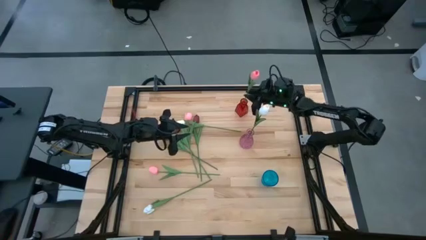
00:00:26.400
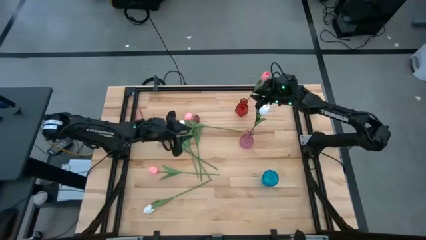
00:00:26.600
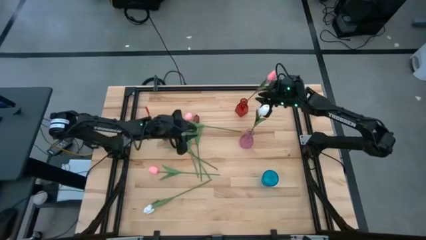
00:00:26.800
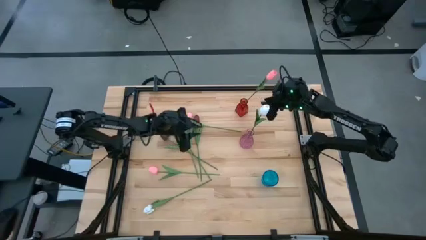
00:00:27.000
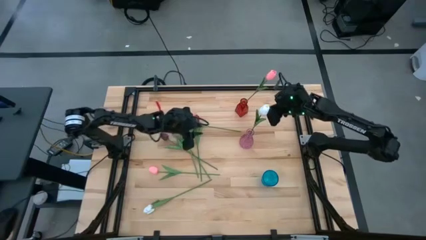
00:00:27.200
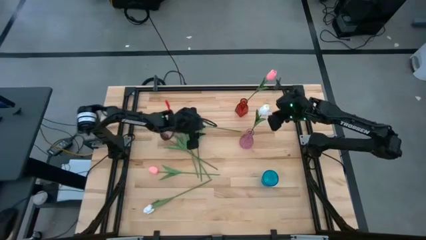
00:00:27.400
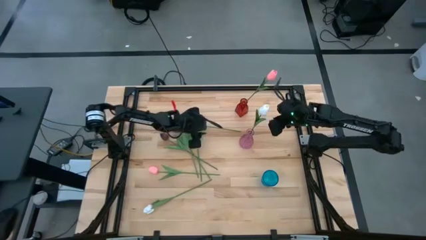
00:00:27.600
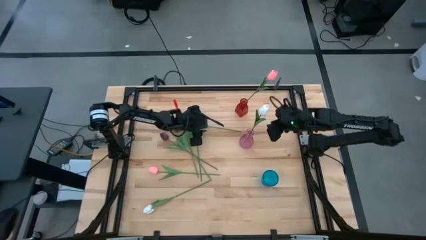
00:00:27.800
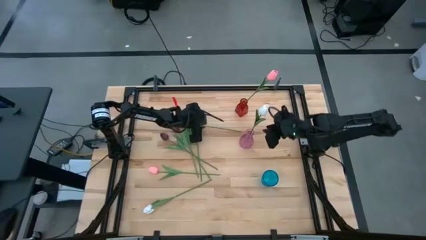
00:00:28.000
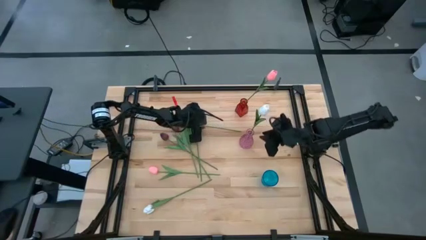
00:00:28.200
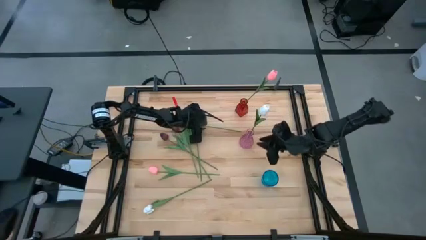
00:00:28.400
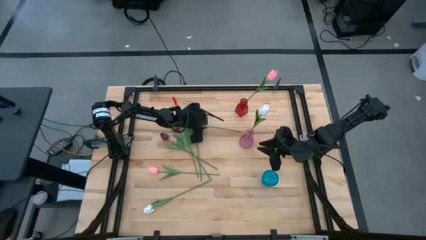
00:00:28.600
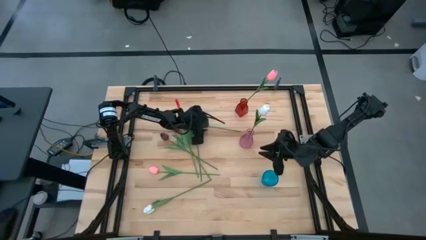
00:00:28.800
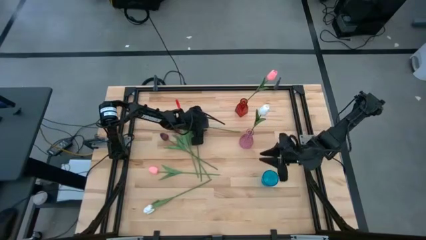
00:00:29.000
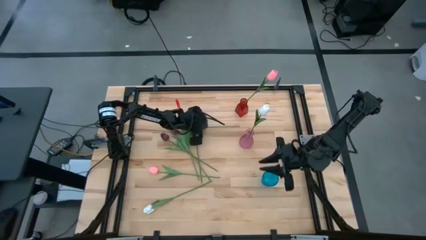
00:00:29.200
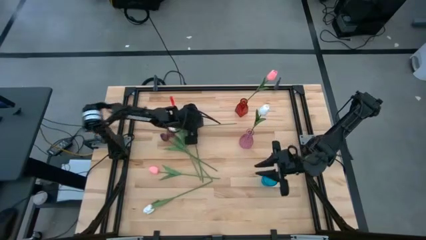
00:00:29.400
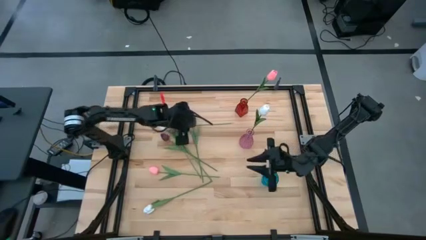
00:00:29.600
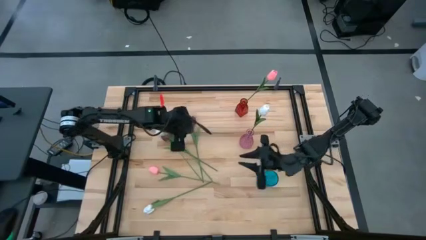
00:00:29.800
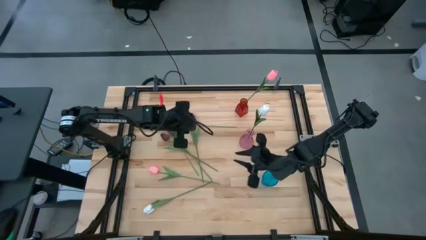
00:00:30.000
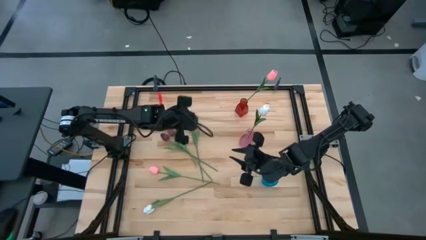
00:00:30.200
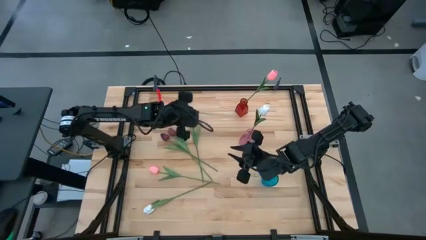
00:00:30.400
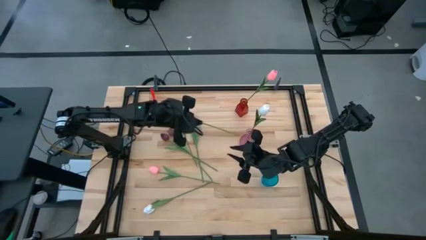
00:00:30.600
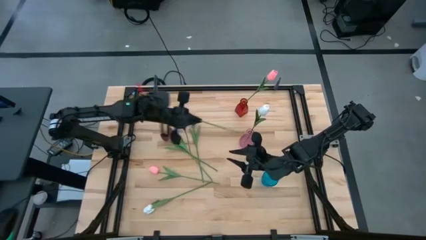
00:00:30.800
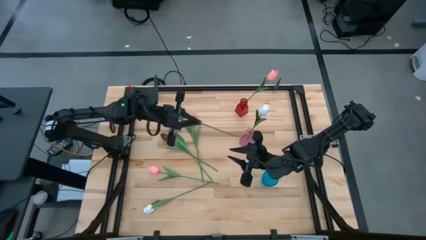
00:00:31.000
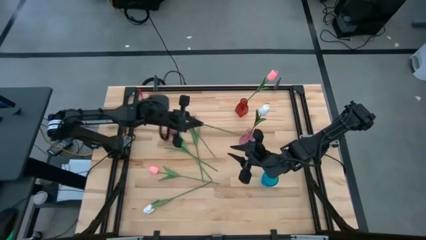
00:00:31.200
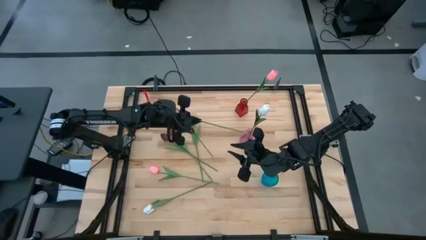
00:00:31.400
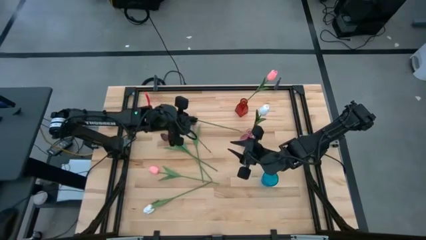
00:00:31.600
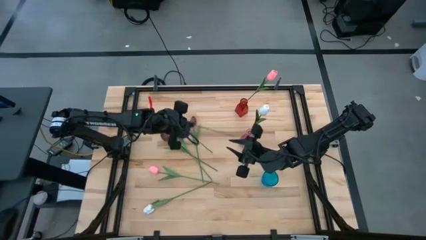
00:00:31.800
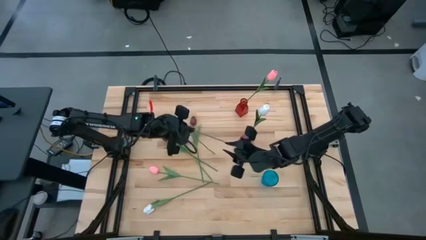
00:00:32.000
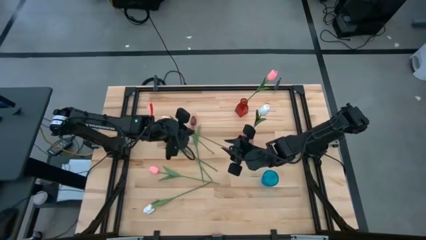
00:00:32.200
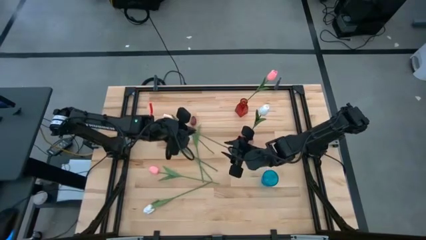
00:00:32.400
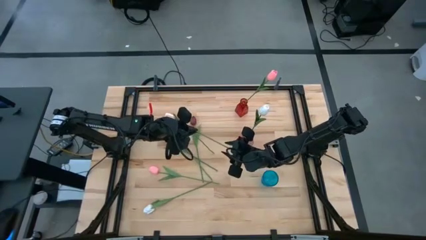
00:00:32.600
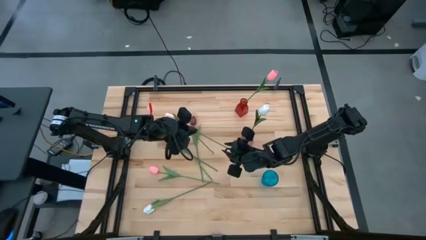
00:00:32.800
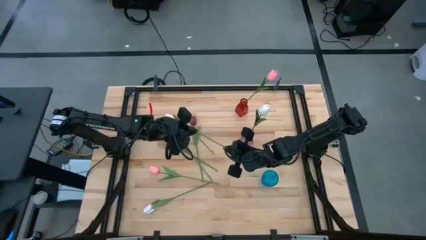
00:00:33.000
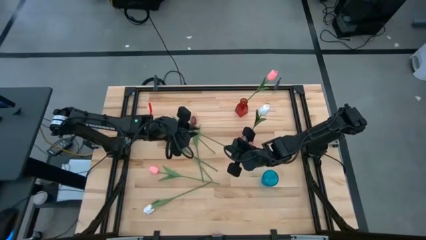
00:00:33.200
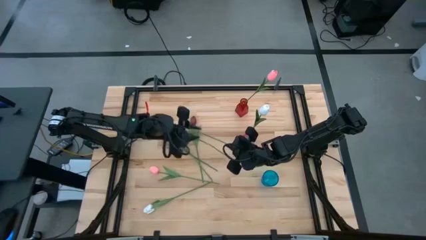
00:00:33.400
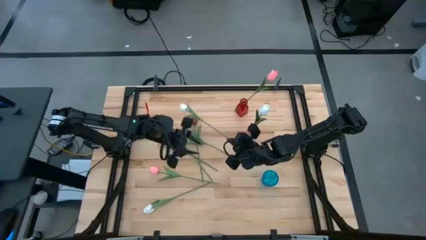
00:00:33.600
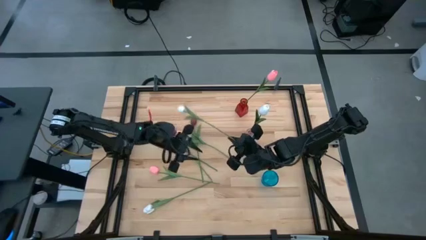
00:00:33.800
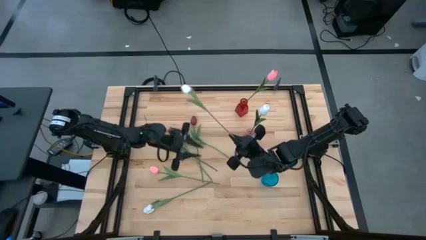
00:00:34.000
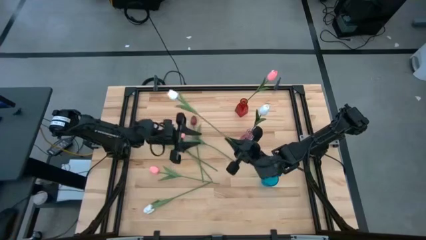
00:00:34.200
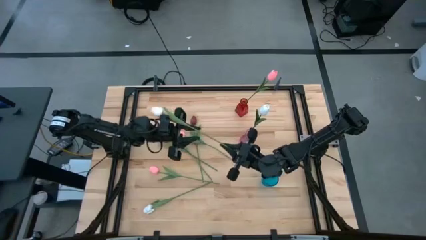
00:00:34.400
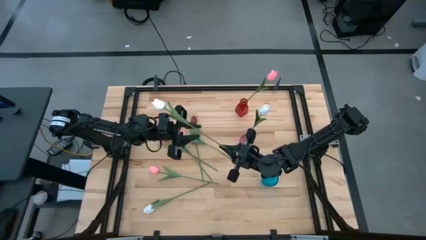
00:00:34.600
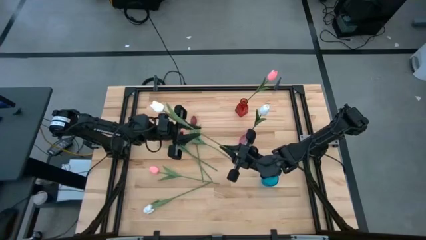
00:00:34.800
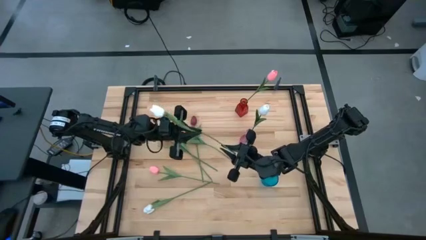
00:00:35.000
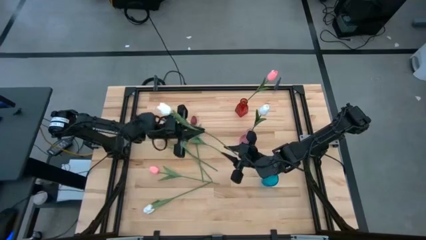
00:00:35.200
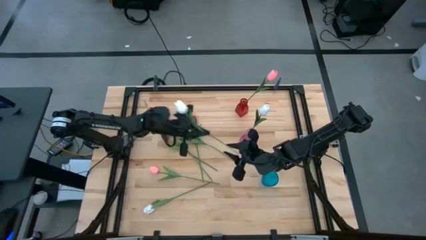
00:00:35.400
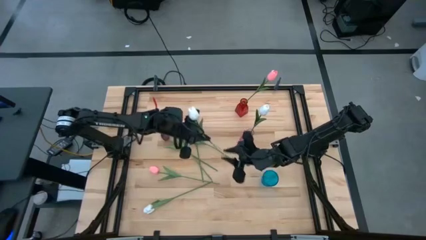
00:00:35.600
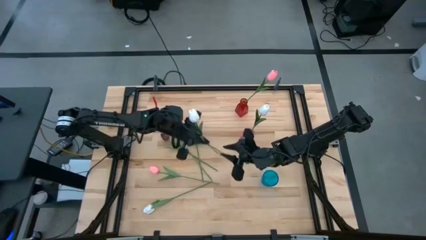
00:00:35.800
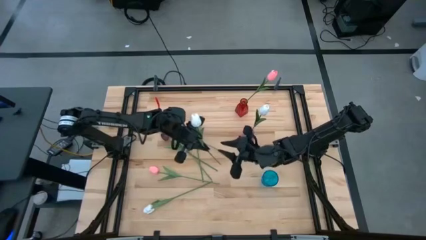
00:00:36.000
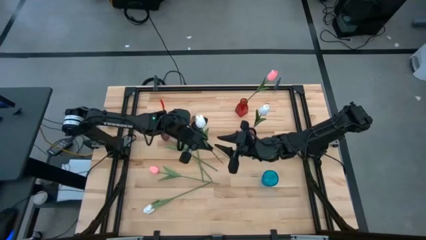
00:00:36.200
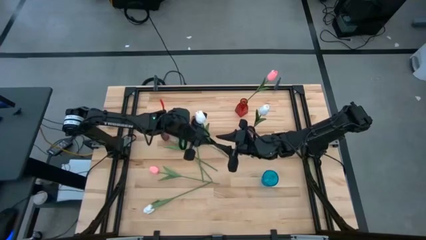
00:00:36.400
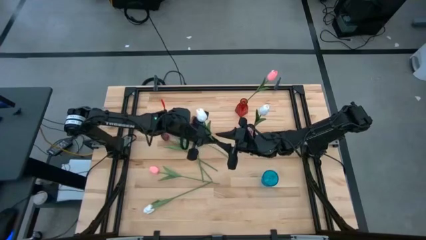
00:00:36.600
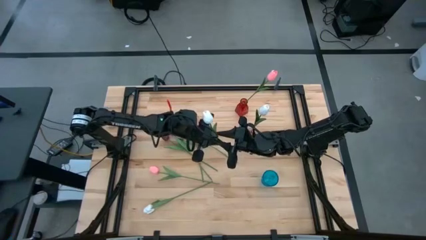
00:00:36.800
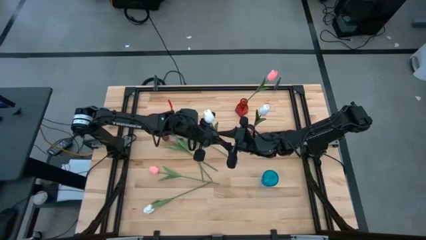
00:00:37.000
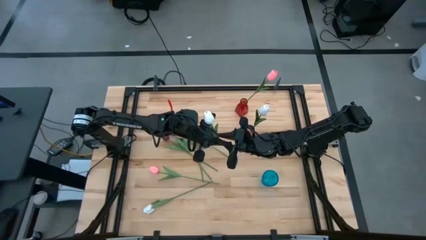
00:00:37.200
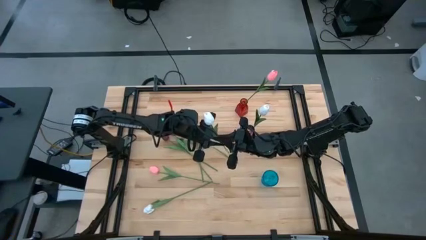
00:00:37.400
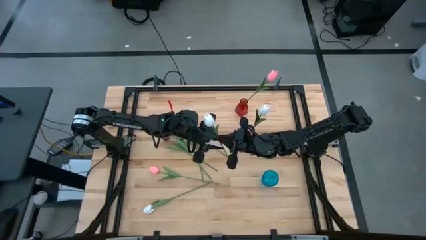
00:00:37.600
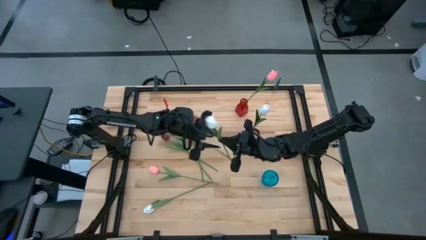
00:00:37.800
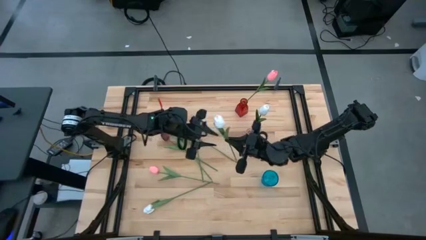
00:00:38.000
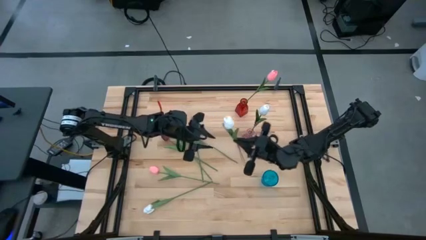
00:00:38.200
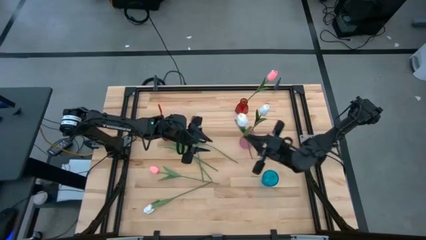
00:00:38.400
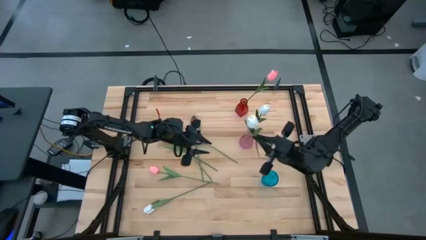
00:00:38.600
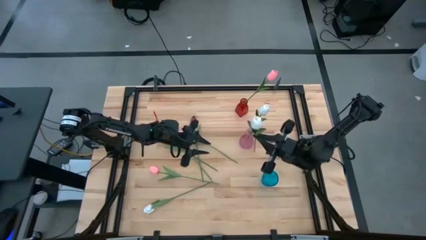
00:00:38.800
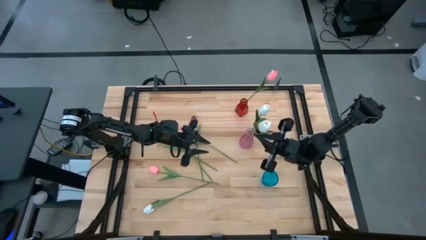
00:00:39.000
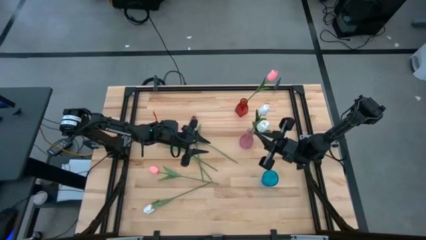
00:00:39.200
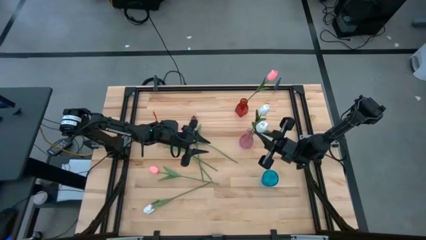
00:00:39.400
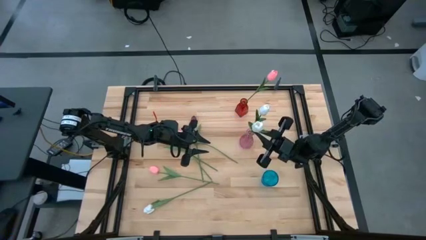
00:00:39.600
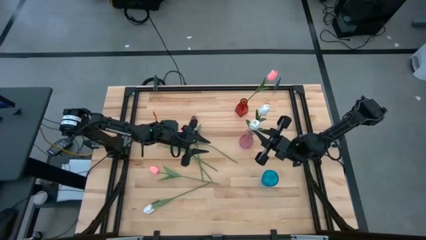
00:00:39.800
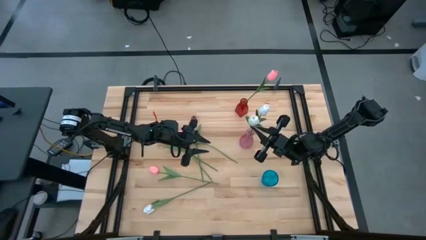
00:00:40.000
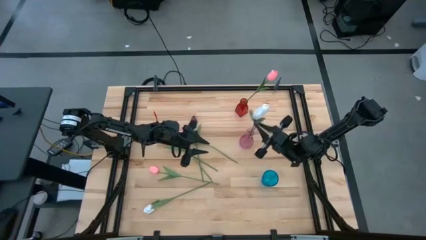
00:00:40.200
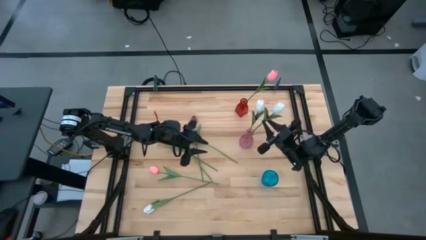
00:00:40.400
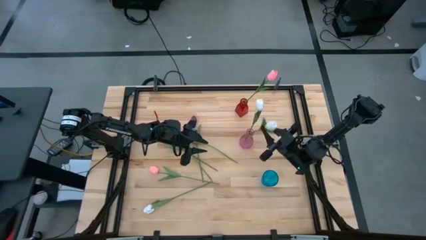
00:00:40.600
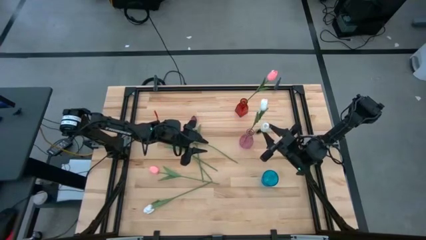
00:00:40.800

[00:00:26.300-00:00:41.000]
Task: Sort flowers into vase by color
Put the top white tulip into the pink vase

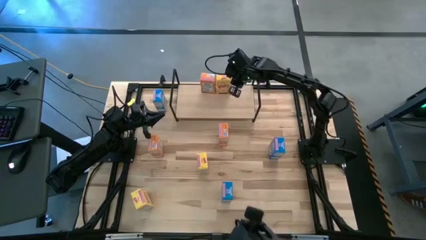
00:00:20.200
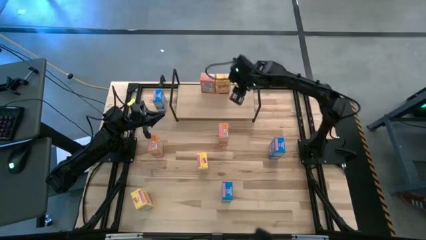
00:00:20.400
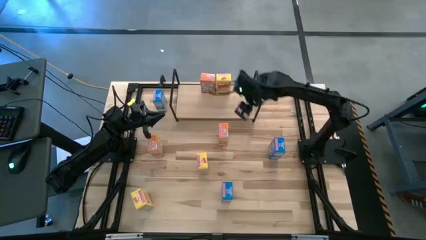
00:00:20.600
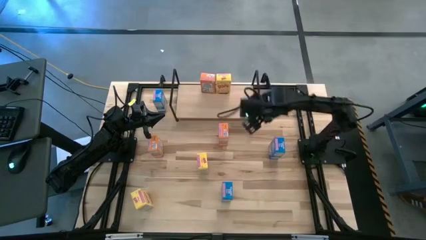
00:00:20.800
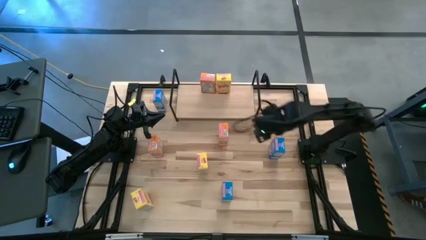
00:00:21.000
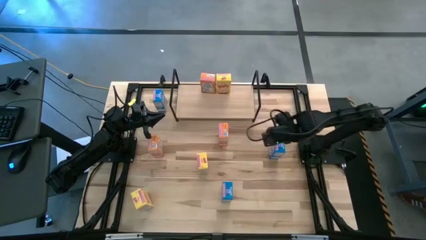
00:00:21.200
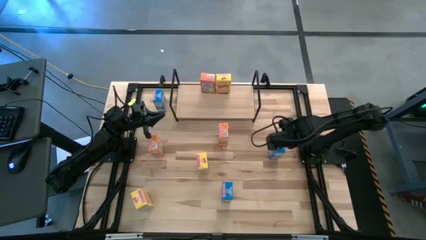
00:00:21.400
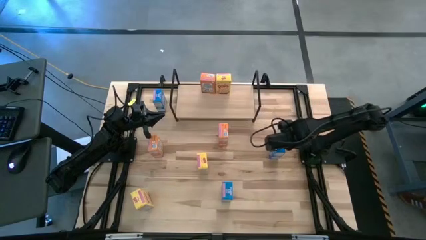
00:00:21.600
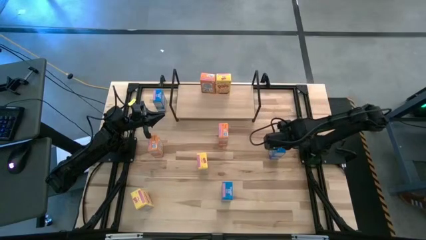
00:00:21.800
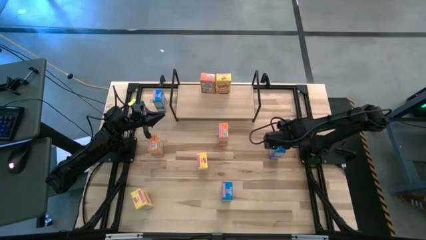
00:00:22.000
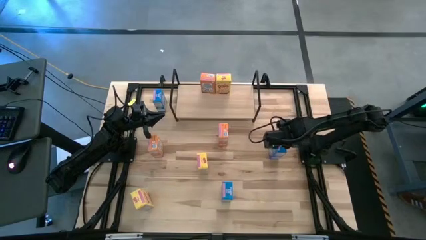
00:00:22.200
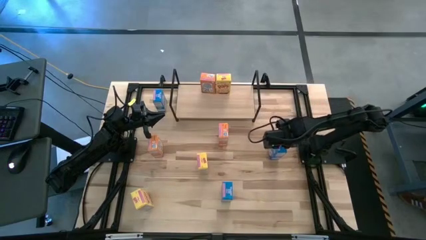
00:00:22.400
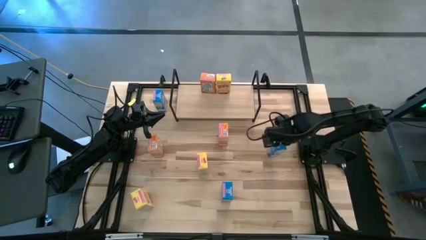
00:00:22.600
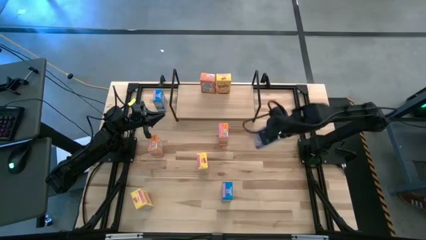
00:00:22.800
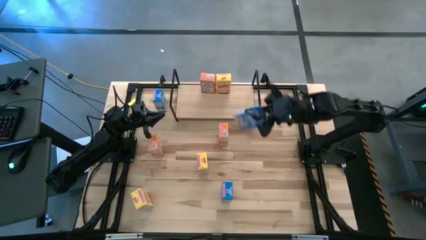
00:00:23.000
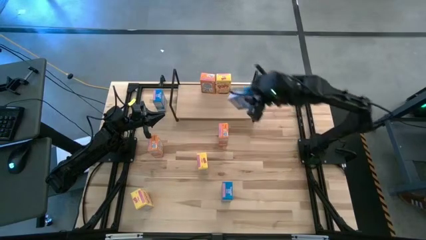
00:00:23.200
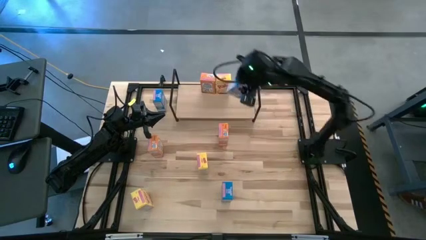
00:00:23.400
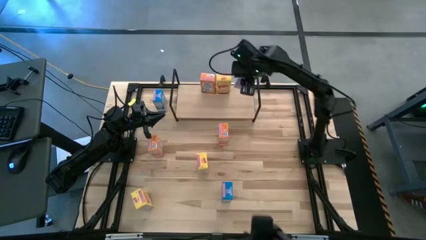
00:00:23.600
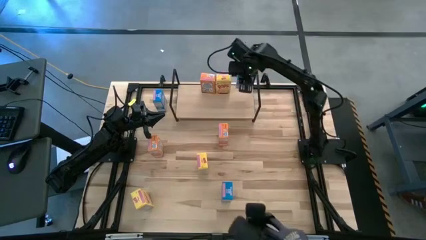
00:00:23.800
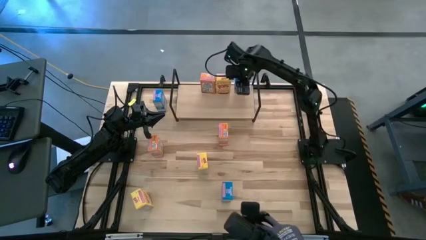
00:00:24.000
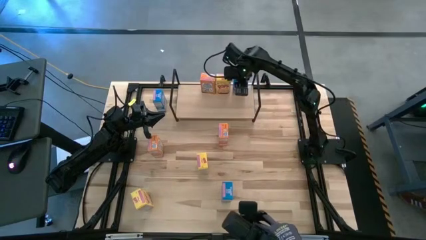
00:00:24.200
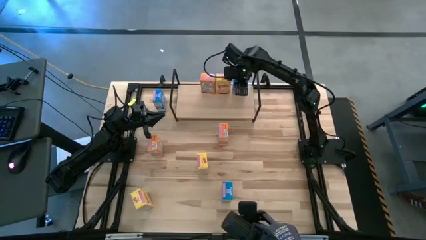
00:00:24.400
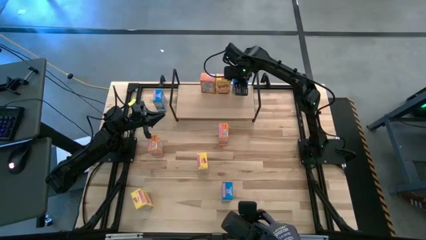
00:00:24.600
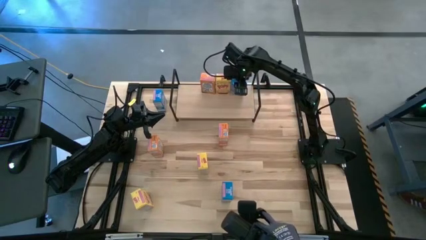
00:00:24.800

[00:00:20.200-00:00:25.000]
Task: Stack cereal on shelf
Put the top right blue cereal box on the shelf
